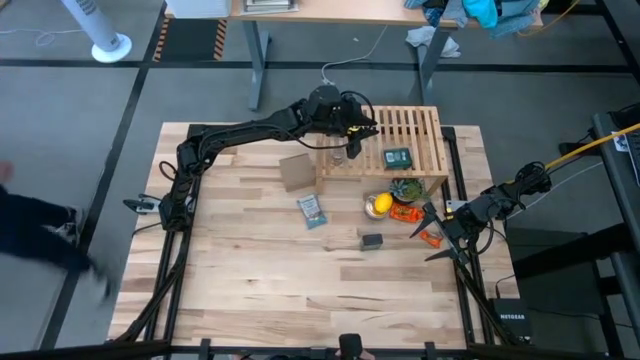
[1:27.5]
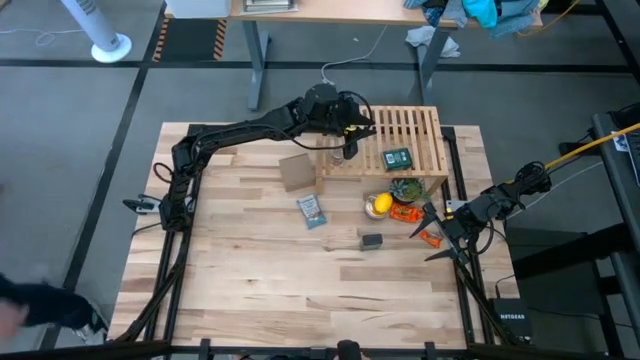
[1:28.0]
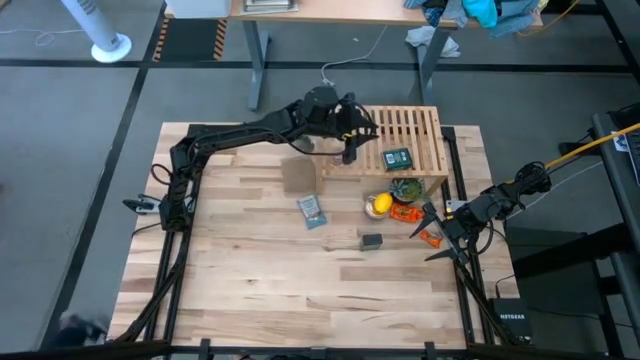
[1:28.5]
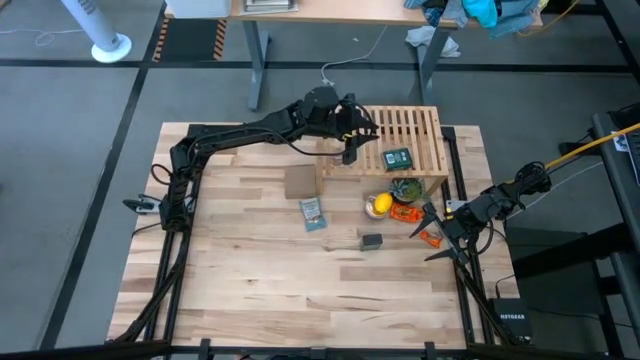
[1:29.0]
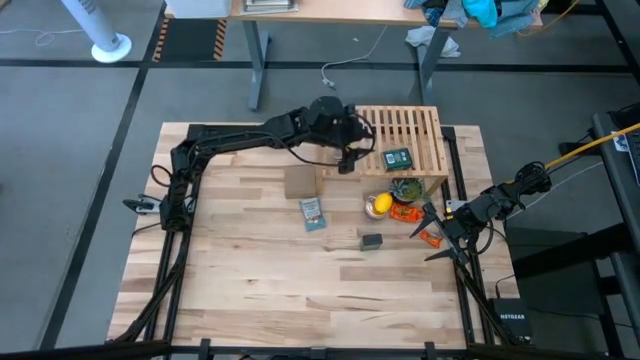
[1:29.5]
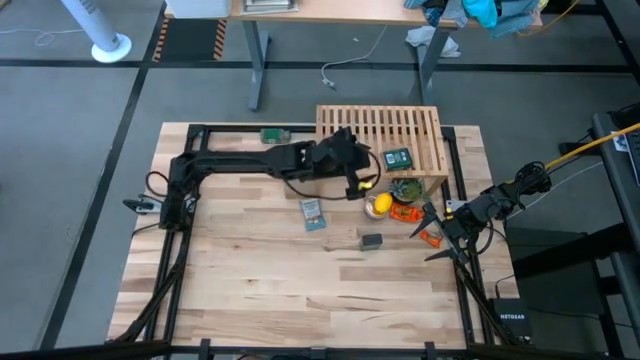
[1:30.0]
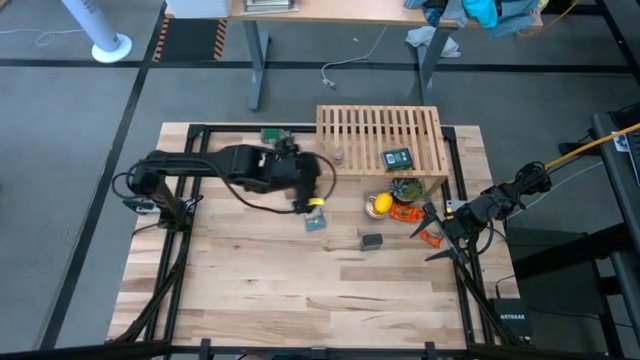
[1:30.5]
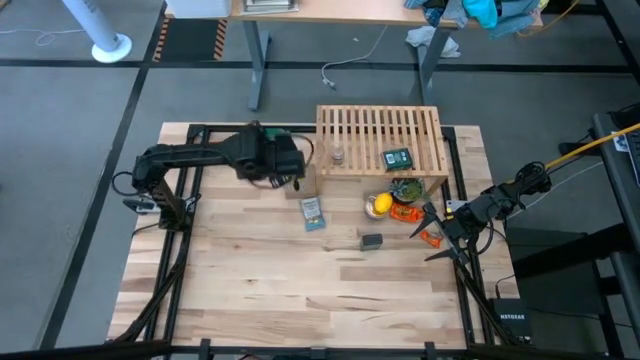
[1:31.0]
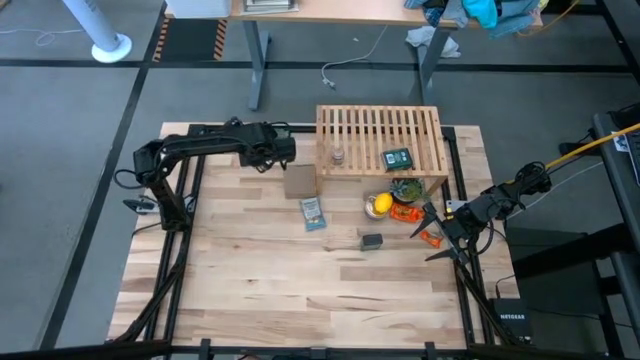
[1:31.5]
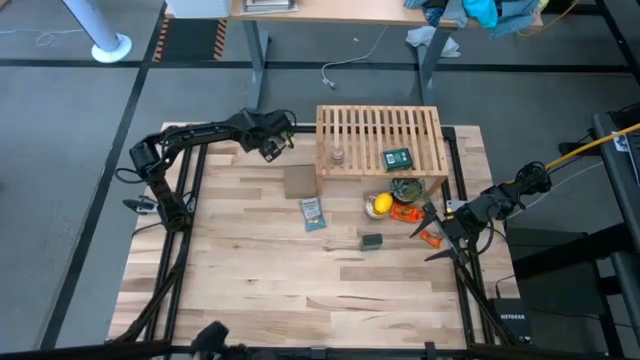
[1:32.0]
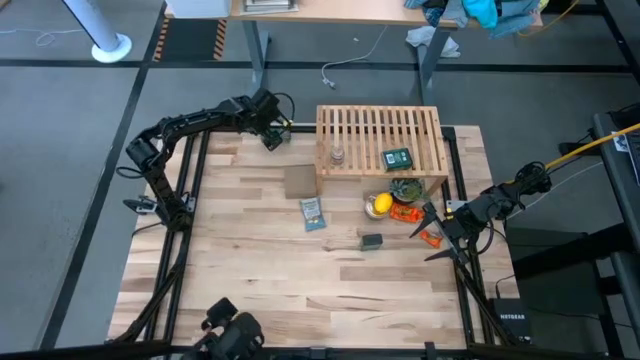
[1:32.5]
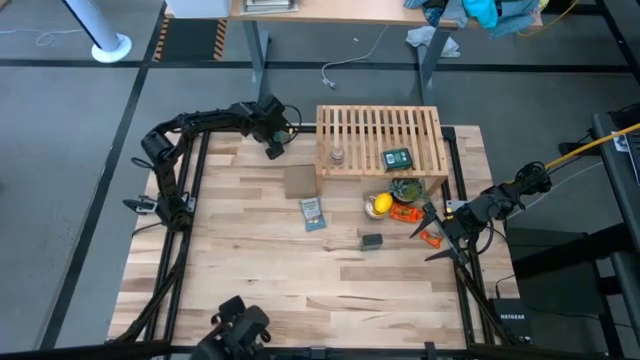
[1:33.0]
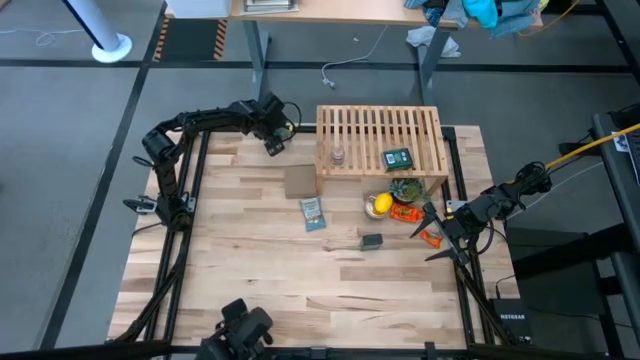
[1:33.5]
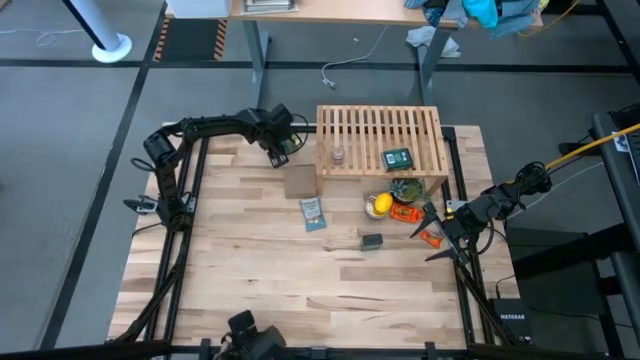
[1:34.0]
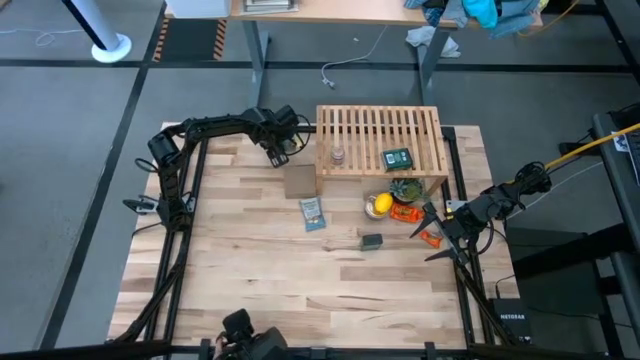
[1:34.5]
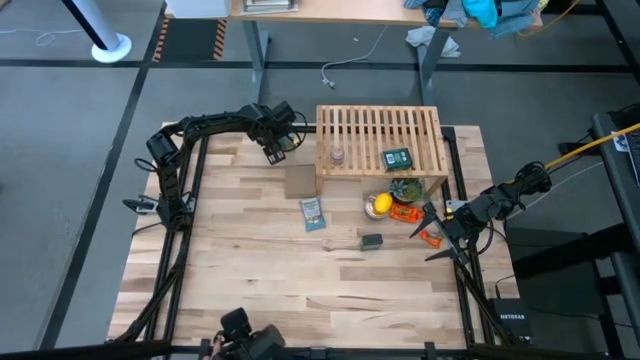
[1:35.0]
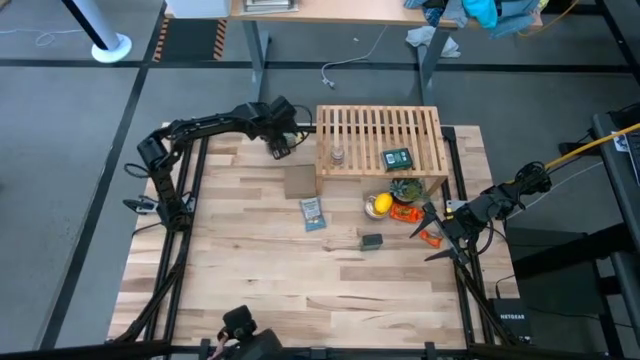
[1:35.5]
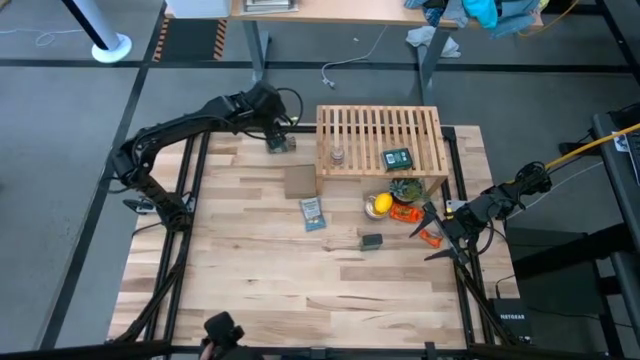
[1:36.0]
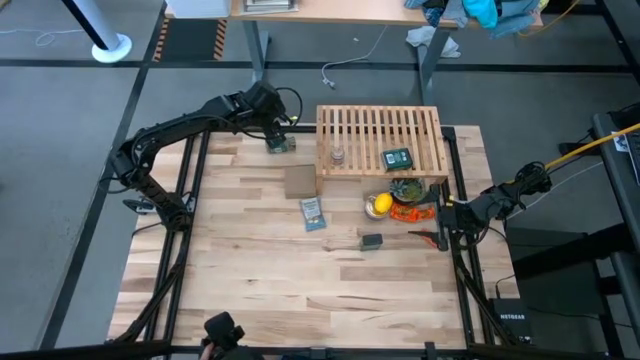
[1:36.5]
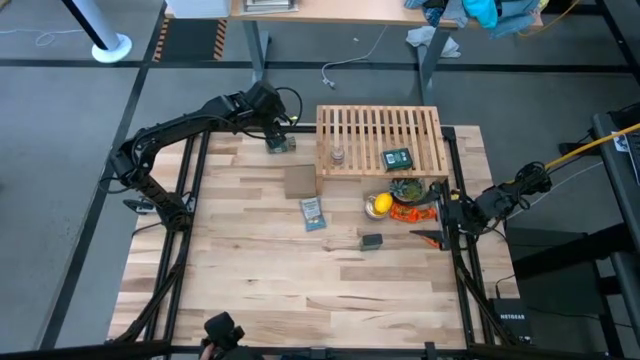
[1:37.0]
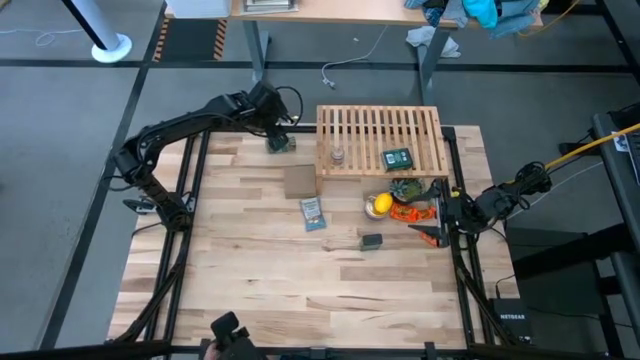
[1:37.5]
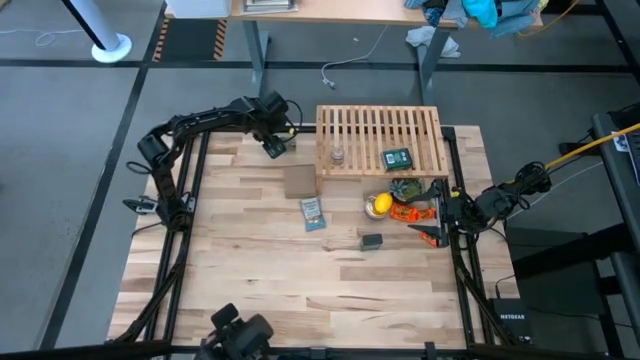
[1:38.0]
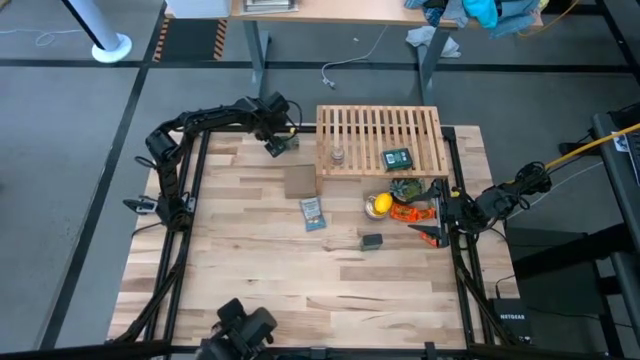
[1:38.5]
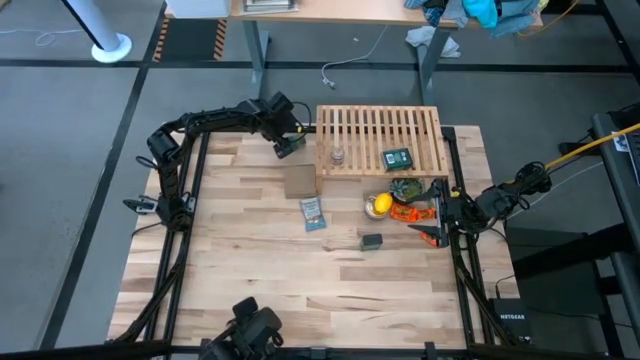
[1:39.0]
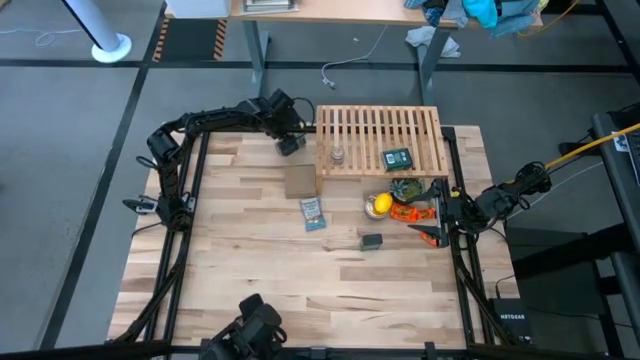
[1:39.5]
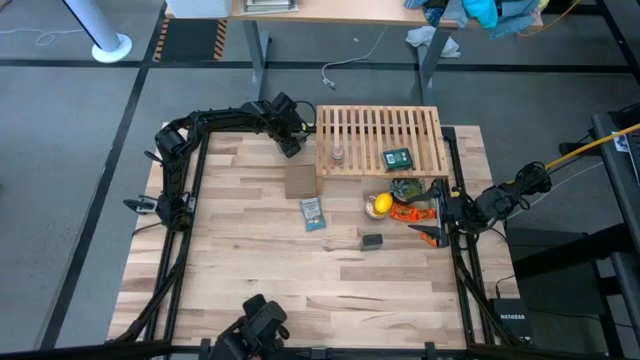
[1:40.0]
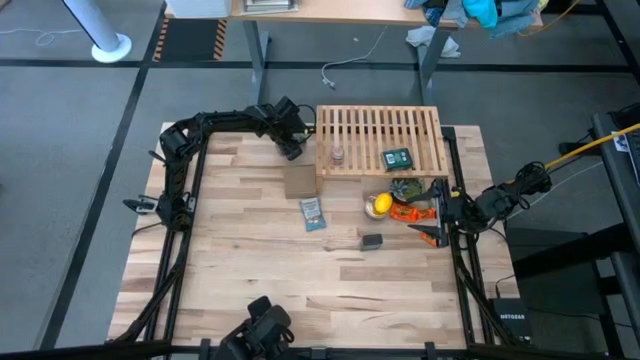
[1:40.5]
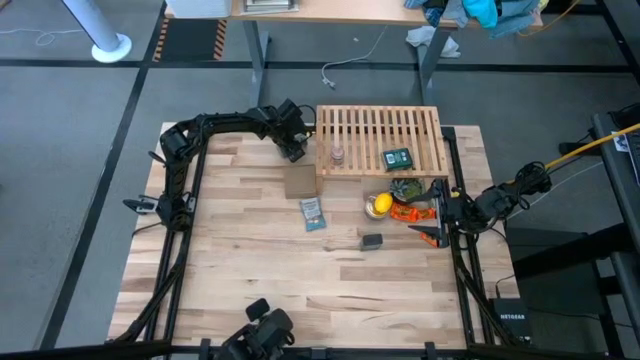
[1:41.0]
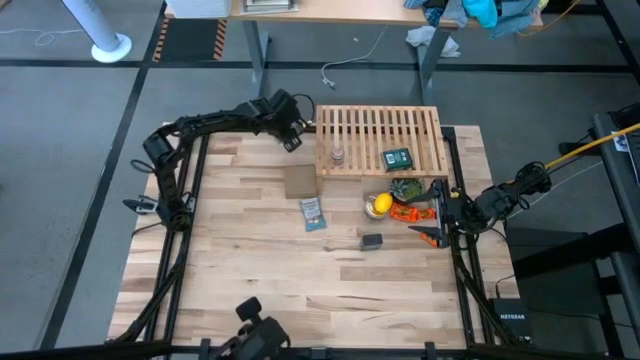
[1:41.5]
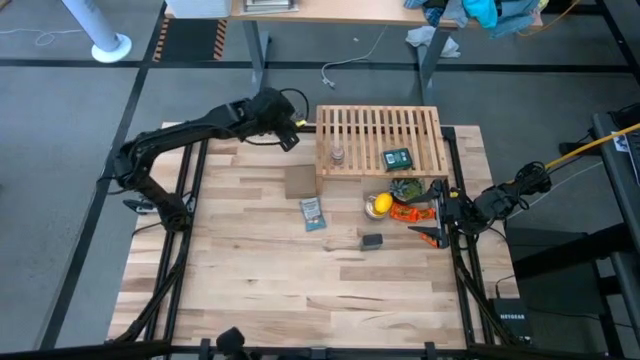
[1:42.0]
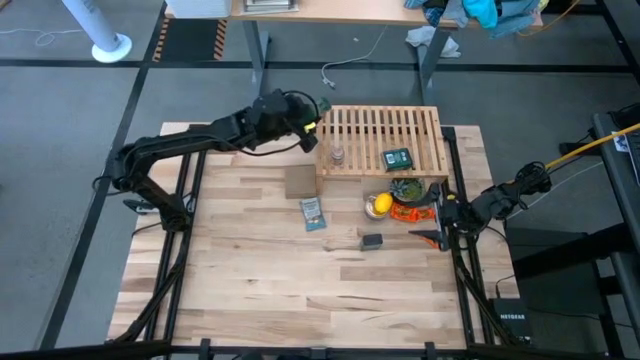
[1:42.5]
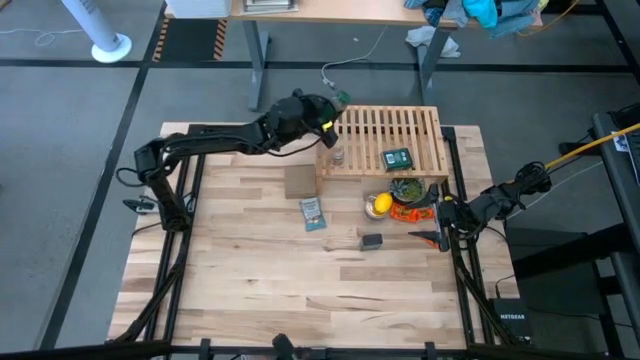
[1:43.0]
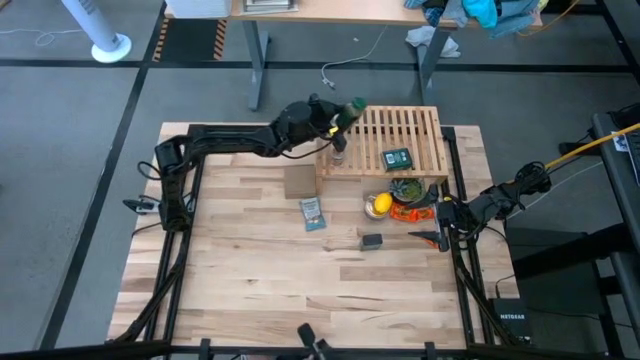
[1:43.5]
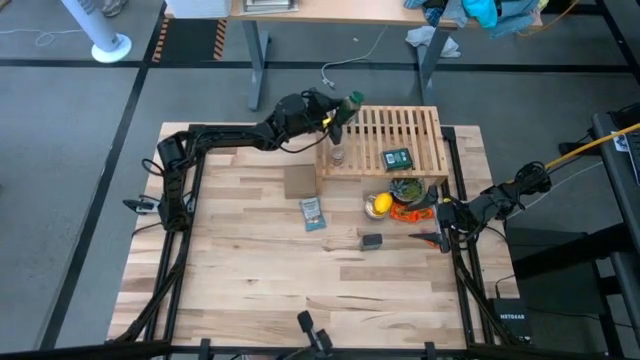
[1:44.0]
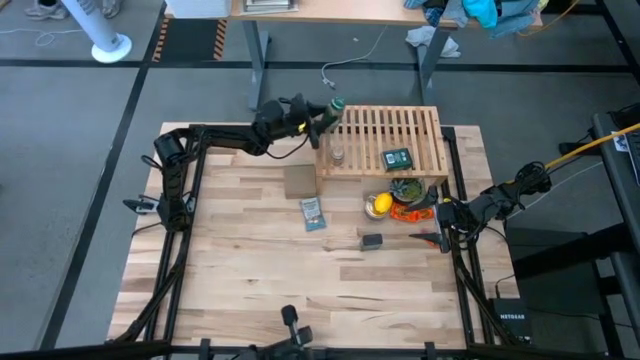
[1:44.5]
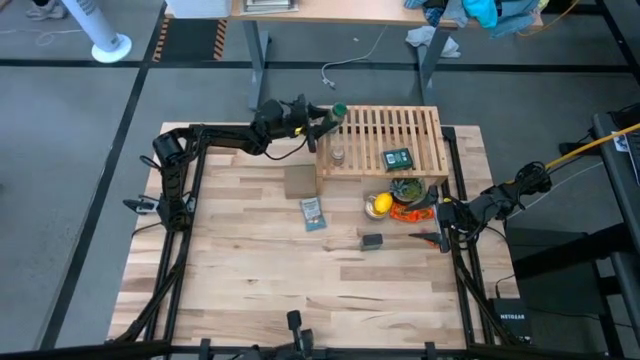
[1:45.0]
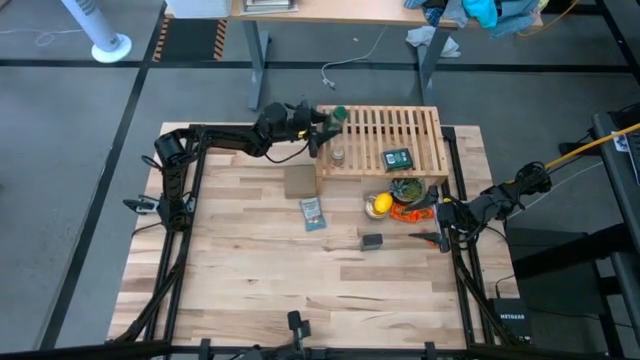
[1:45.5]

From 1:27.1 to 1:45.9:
Task: Shelf spices
Put the green seasoning bottle on the shelf

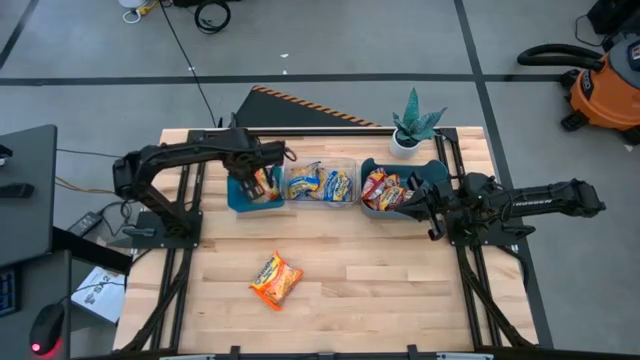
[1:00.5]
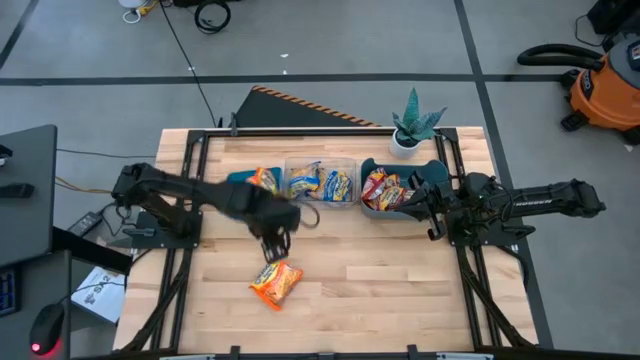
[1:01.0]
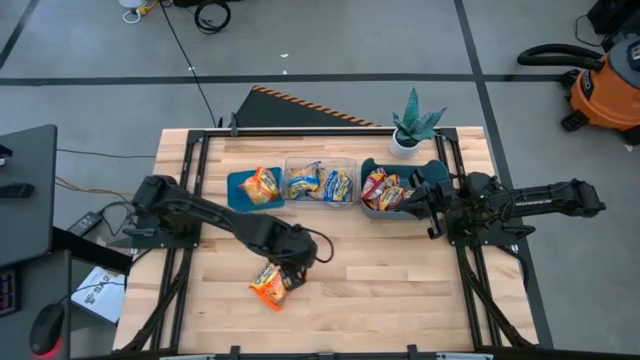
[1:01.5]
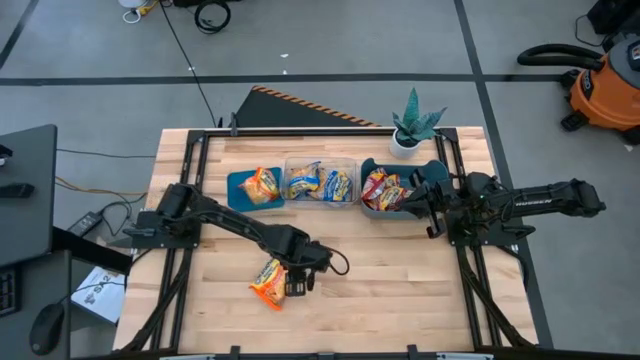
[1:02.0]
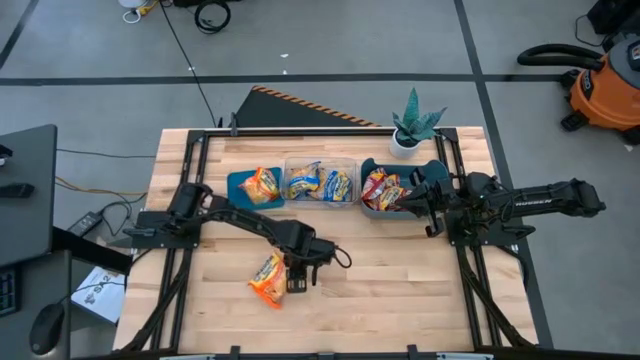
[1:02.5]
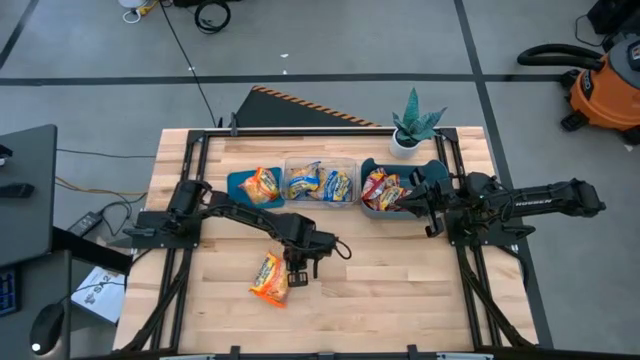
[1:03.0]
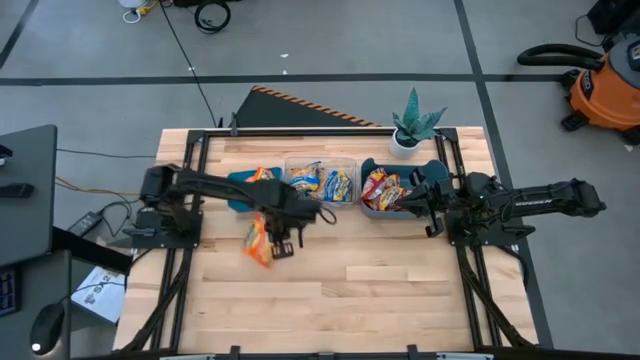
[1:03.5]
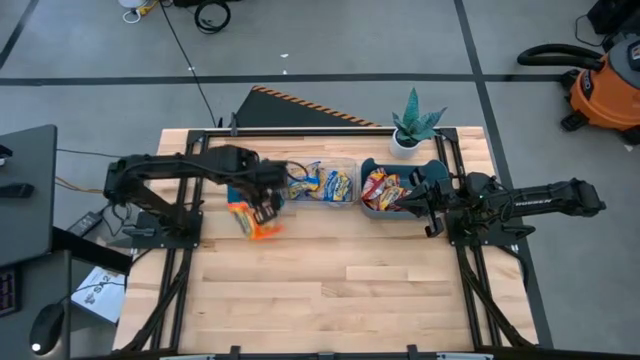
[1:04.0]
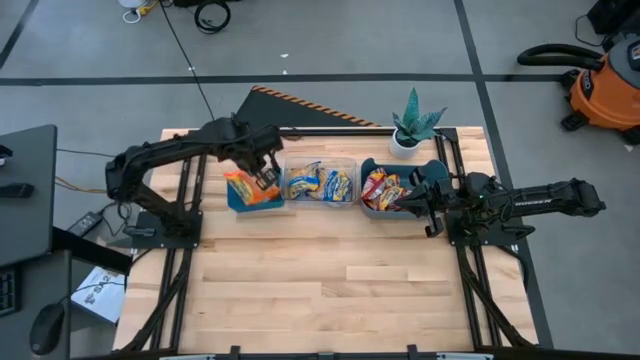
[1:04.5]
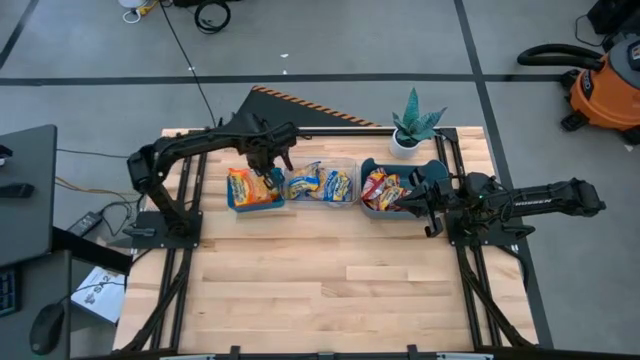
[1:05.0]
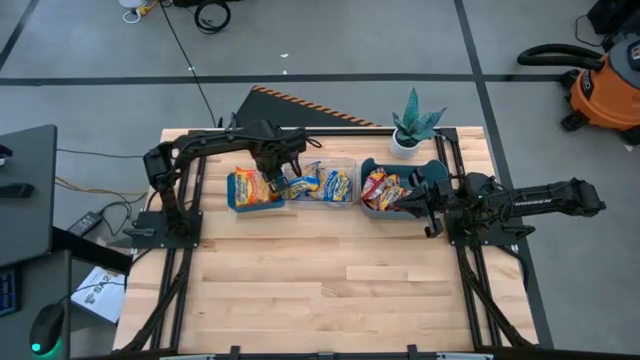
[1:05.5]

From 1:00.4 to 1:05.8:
Task: Sort Maruchan noodles
Put the orange noddle pack into the blue bin
